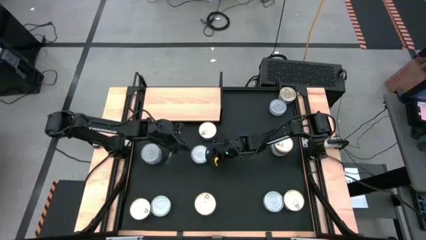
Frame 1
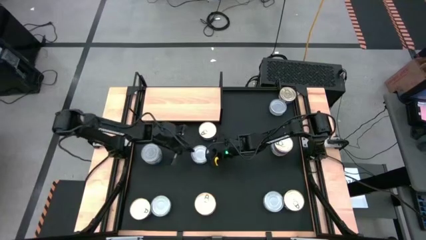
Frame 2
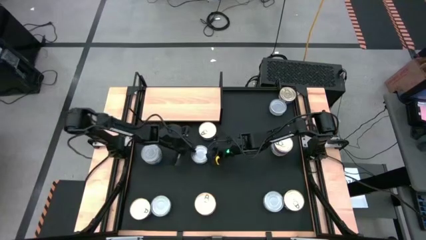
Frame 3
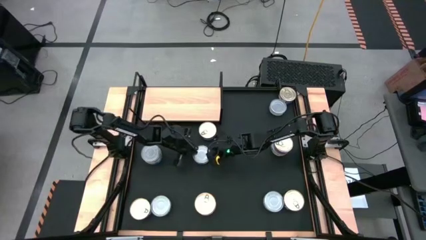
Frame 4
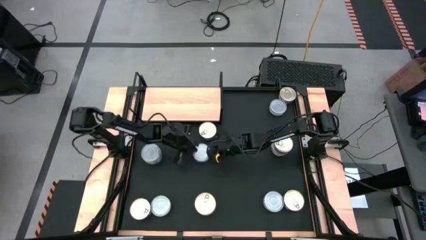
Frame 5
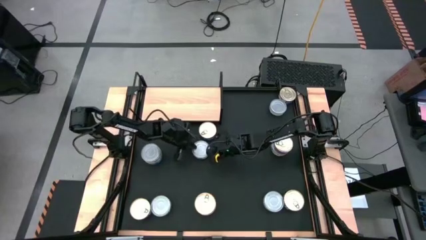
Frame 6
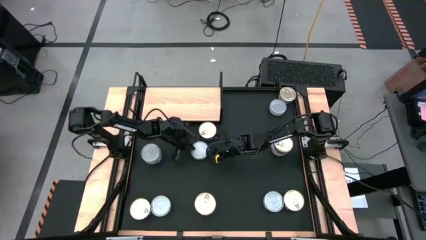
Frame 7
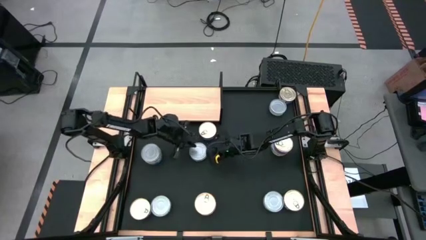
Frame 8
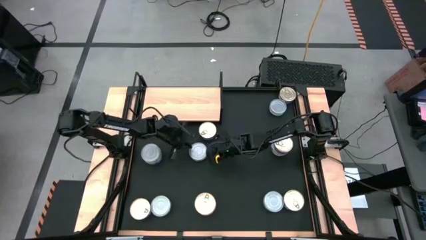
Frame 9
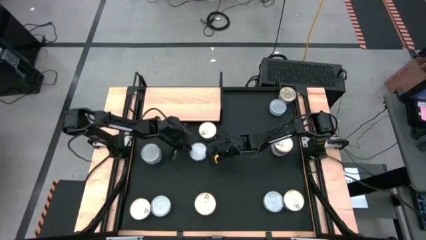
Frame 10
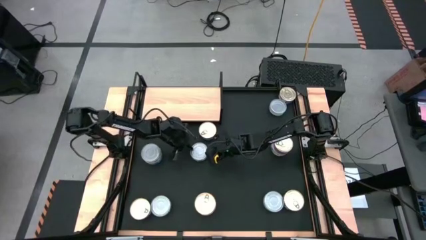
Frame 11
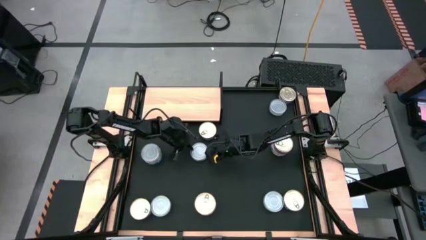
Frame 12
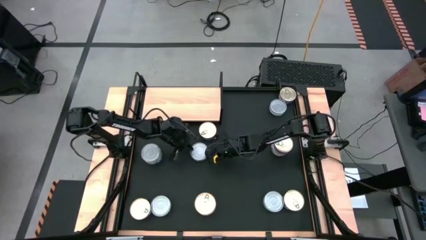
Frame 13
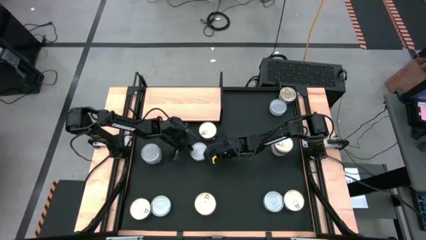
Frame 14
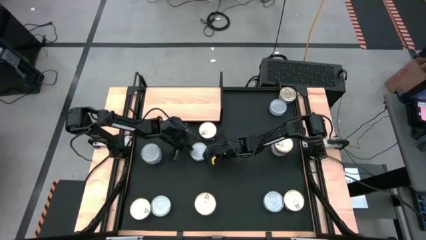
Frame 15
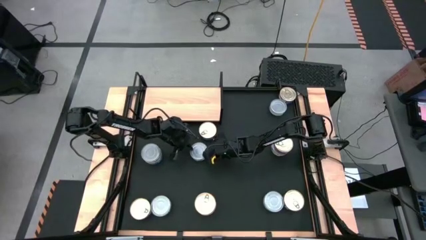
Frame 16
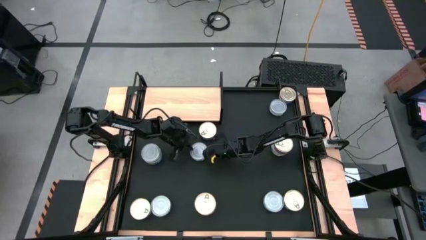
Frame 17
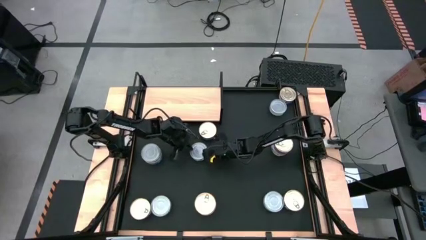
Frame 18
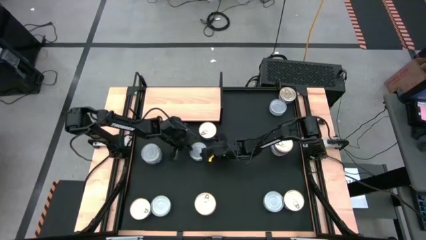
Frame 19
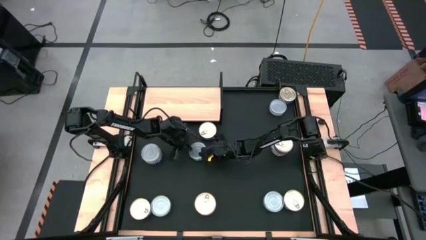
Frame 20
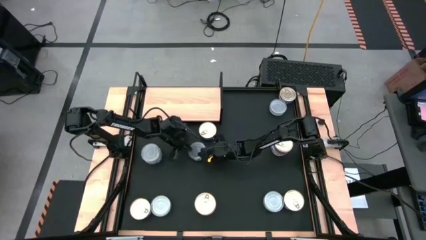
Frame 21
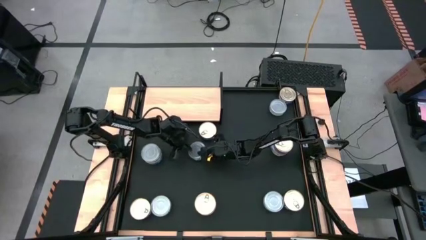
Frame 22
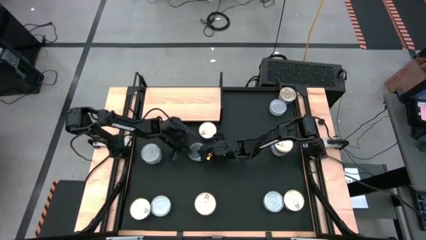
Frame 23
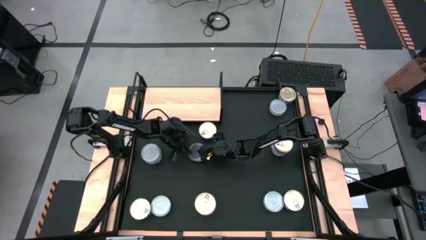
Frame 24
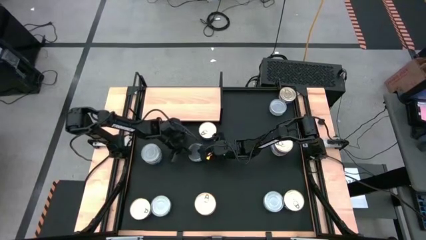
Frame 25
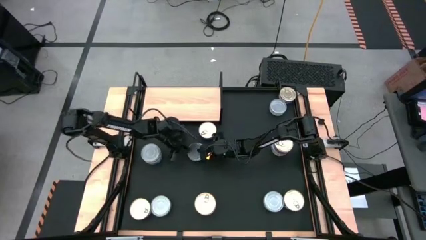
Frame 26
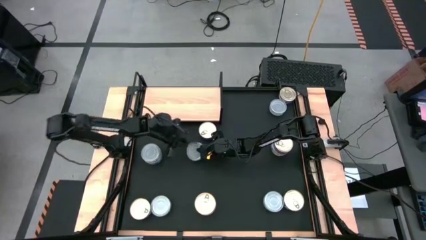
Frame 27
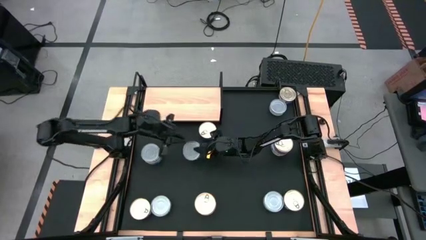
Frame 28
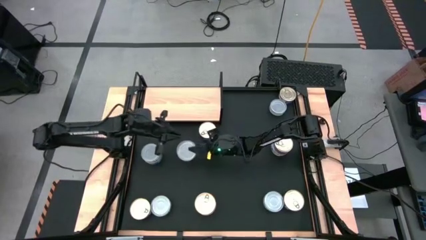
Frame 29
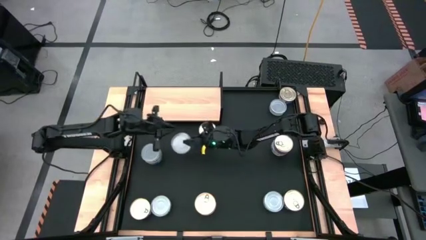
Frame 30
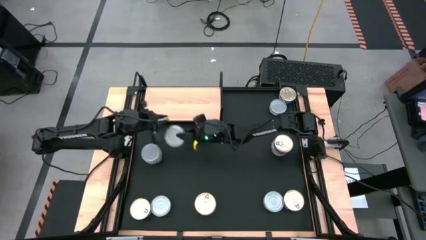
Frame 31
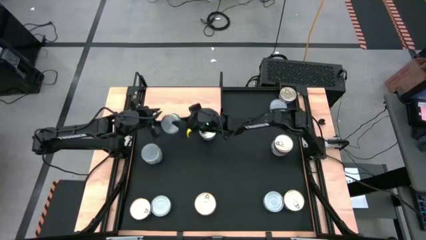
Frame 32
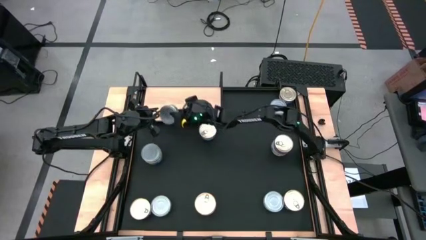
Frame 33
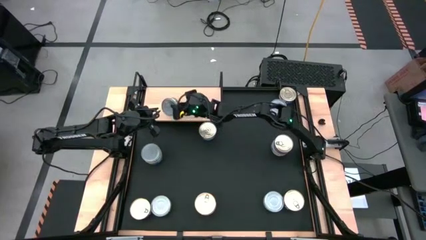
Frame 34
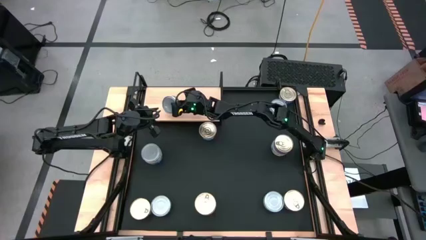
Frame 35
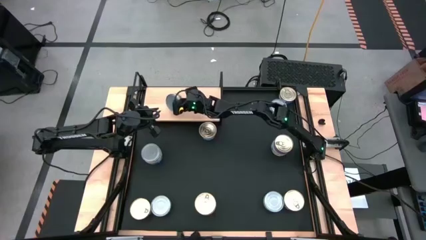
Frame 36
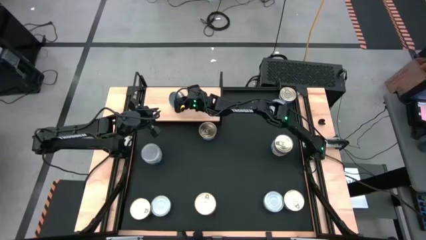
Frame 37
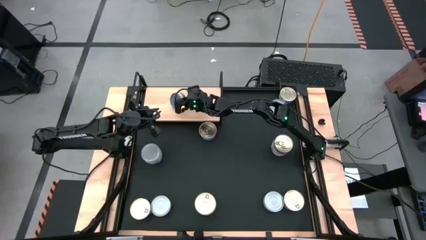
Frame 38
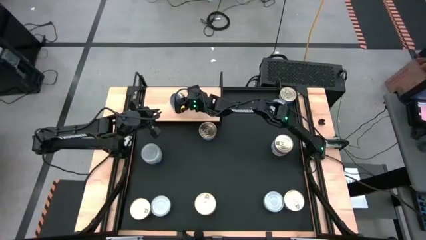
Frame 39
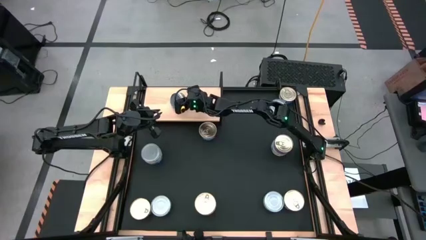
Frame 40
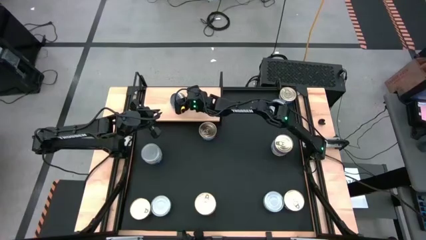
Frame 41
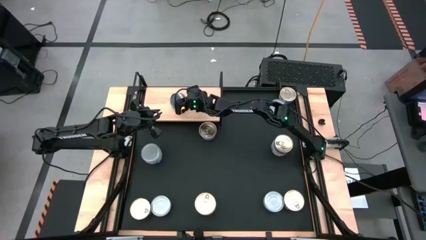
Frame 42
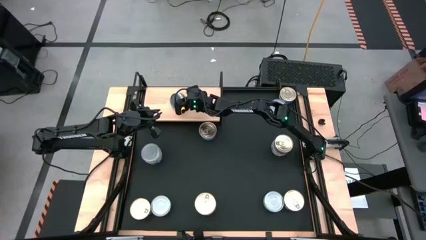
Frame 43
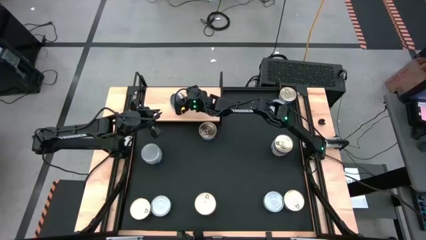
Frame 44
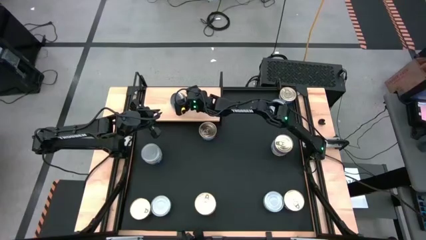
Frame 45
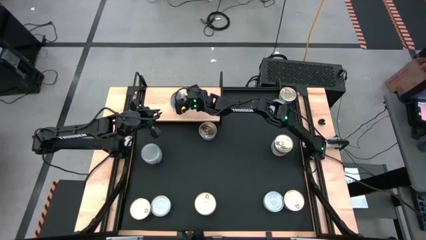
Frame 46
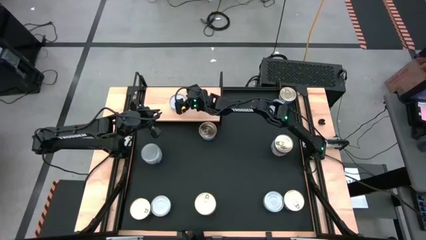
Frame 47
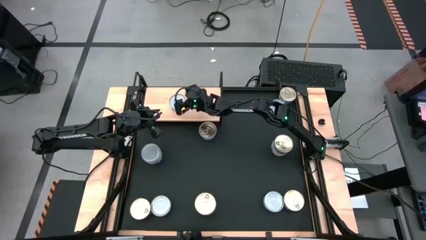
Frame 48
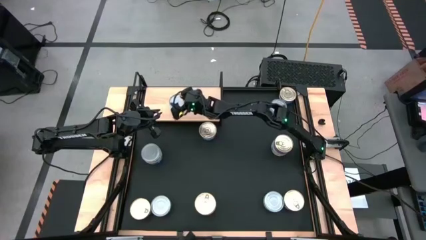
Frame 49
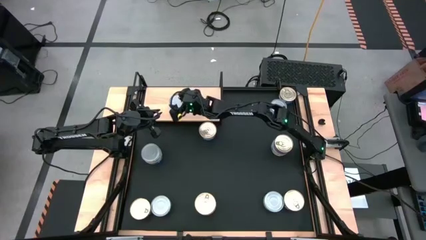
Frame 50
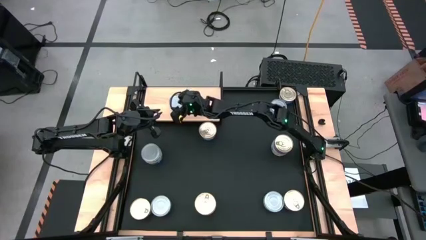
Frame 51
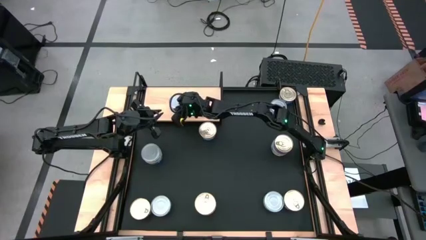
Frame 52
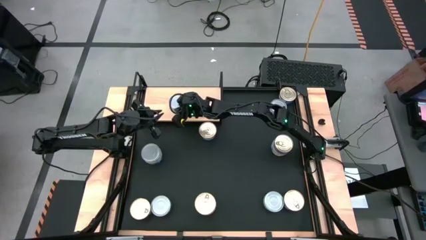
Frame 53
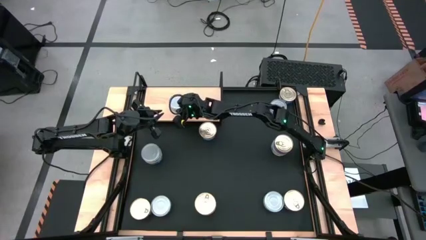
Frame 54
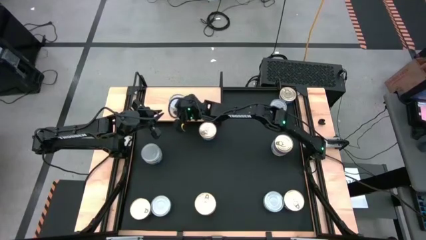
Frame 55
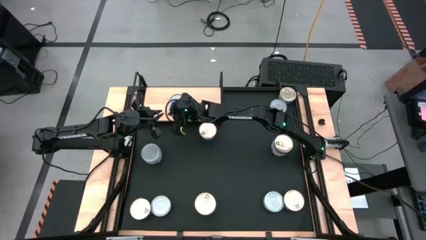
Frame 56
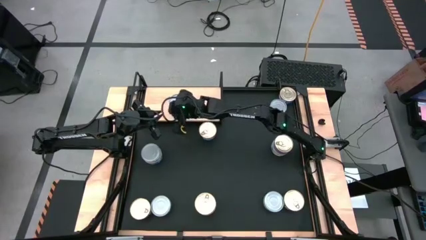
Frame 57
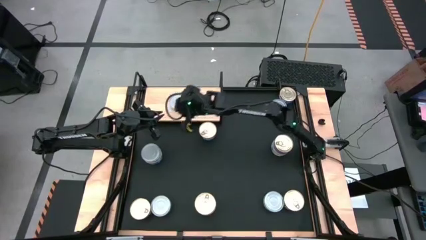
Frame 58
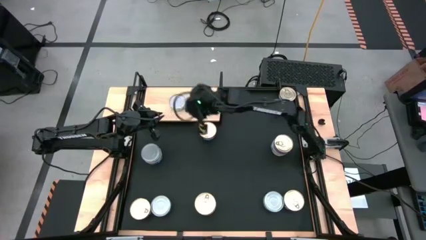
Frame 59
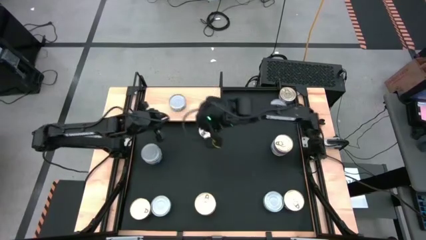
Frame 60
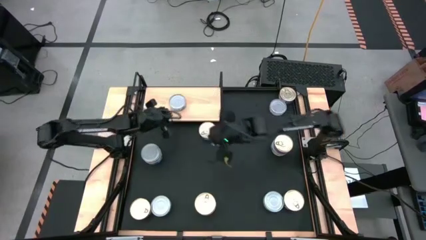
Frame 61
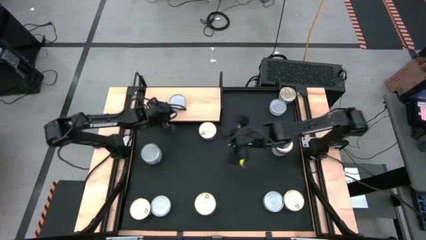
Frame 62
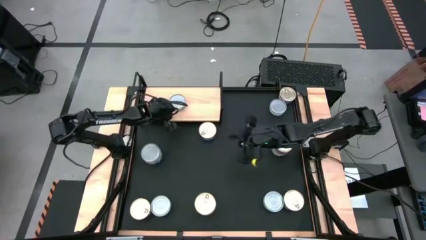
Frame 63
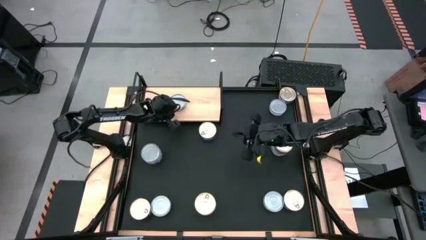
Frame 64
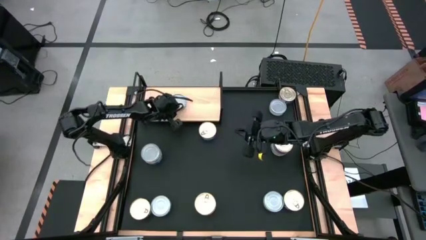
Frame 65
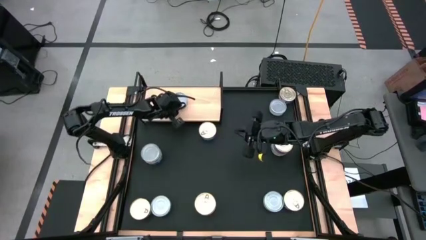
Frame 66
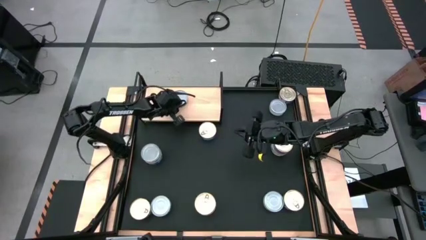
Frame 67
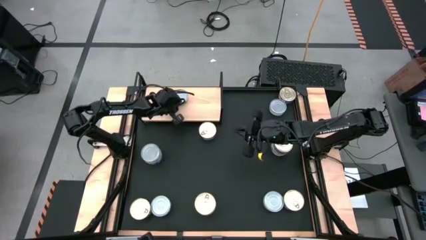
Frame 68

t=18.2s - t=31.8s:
Task: Stack canned seafood by type on shelf
Put the green tuna can on the shelf
